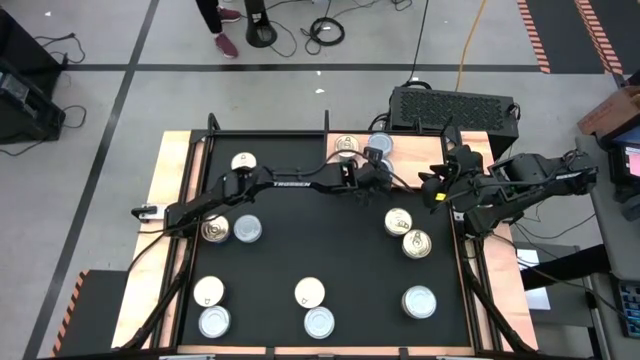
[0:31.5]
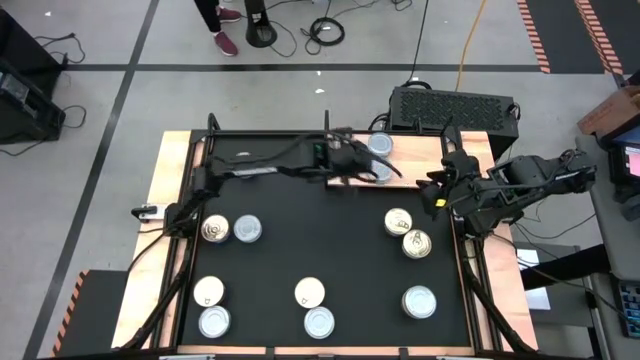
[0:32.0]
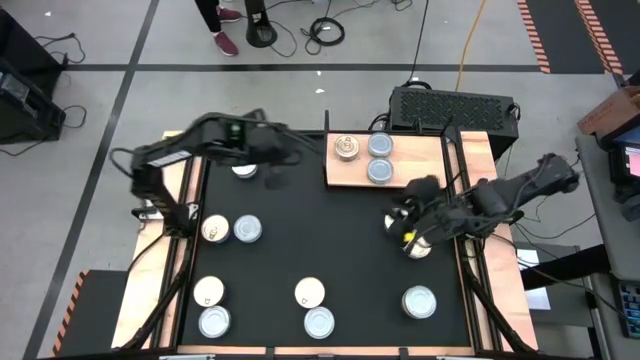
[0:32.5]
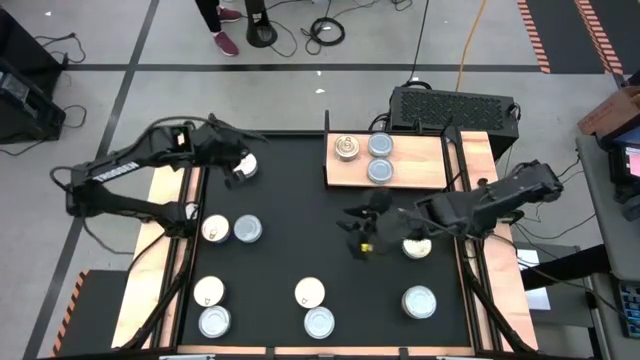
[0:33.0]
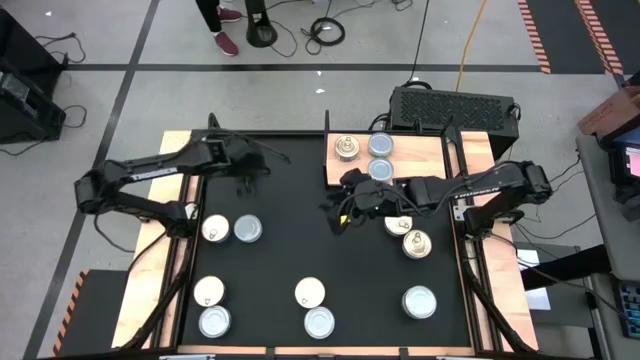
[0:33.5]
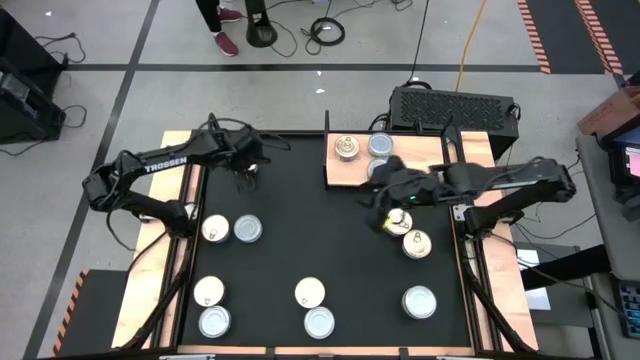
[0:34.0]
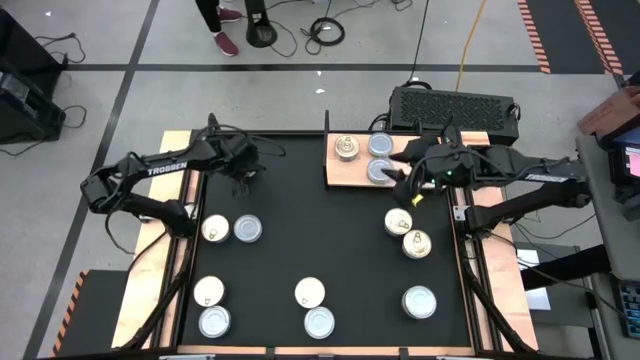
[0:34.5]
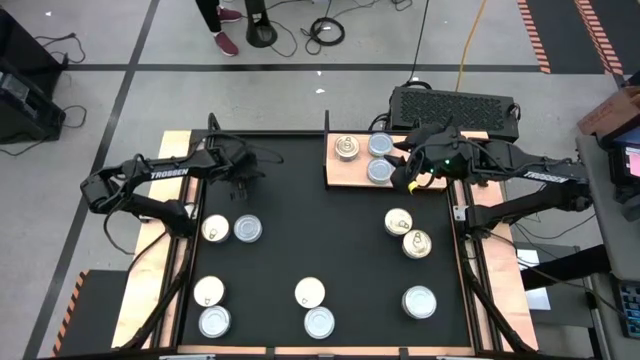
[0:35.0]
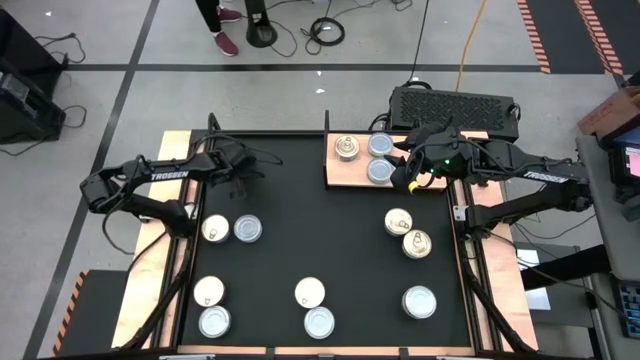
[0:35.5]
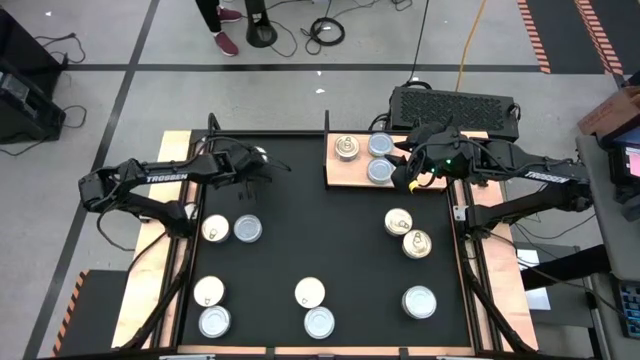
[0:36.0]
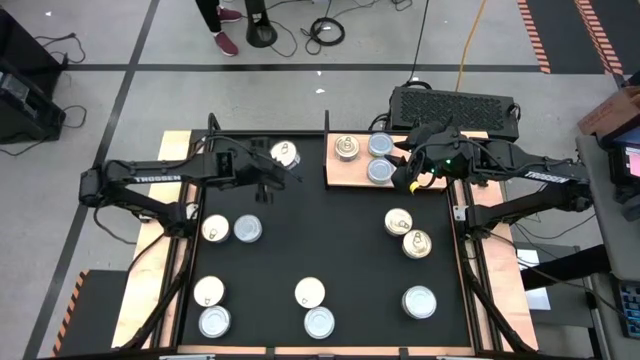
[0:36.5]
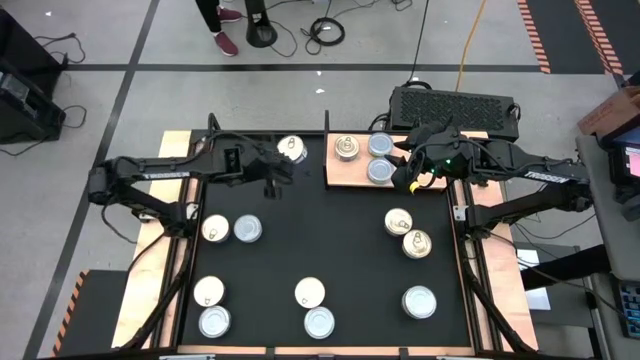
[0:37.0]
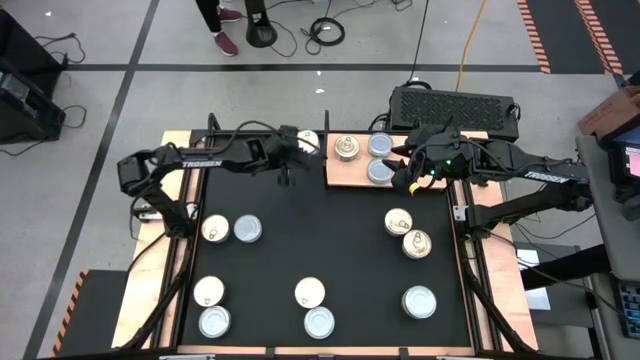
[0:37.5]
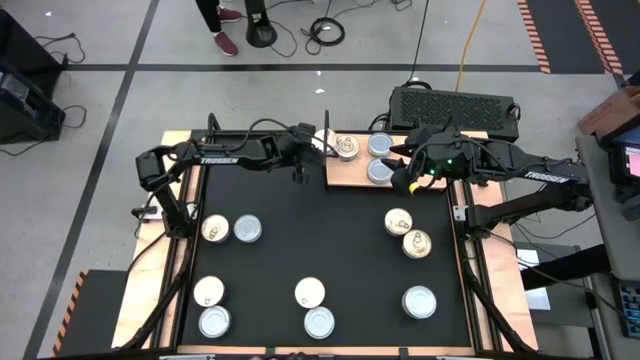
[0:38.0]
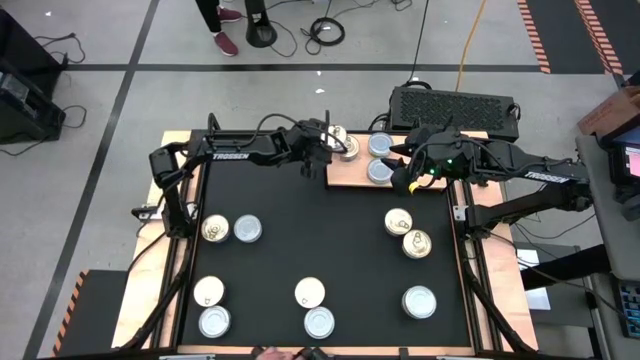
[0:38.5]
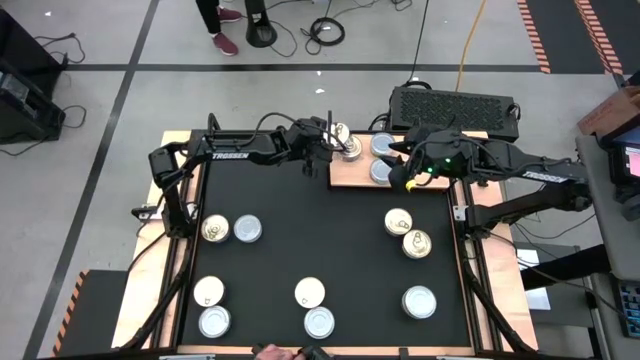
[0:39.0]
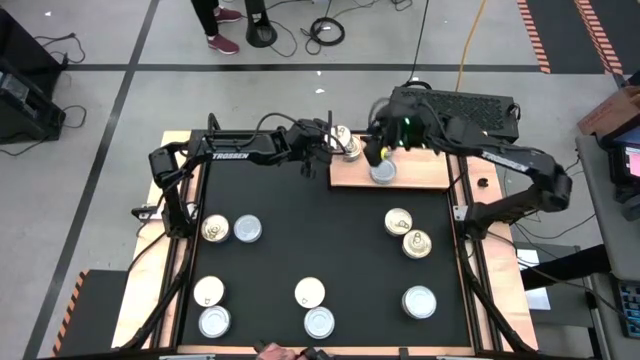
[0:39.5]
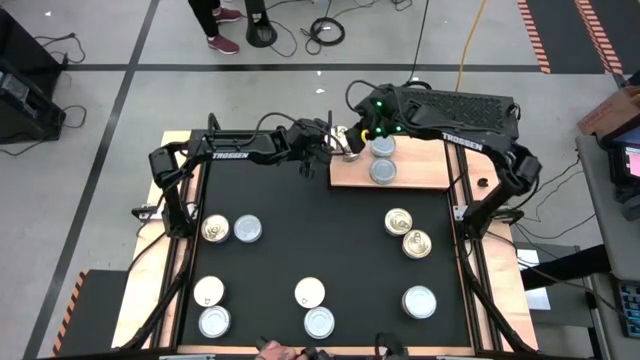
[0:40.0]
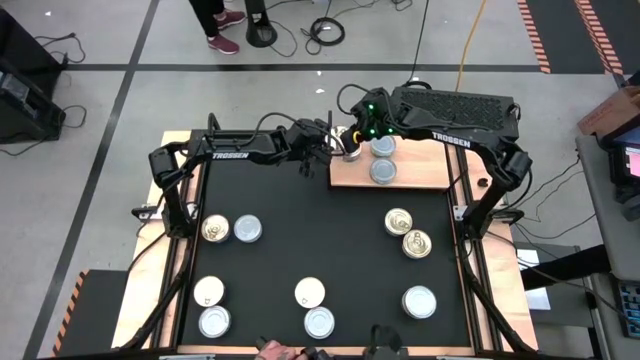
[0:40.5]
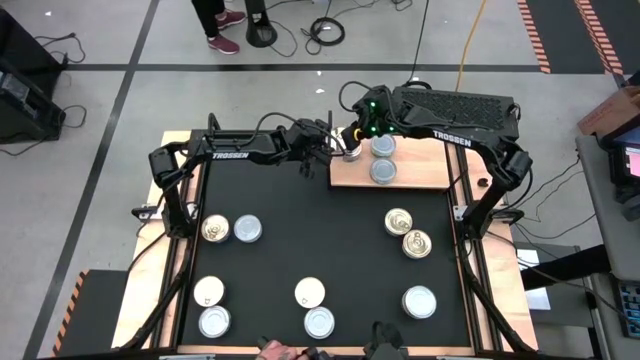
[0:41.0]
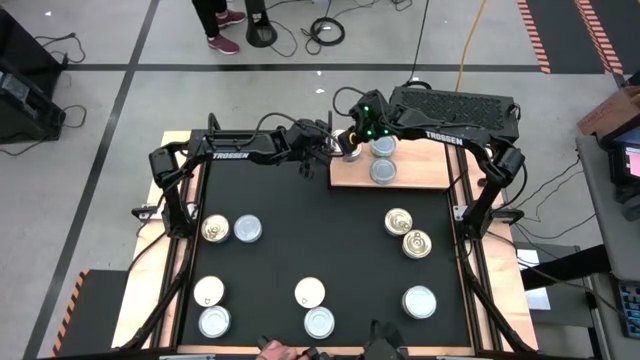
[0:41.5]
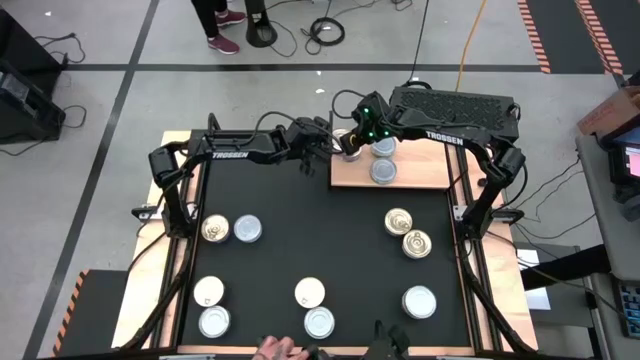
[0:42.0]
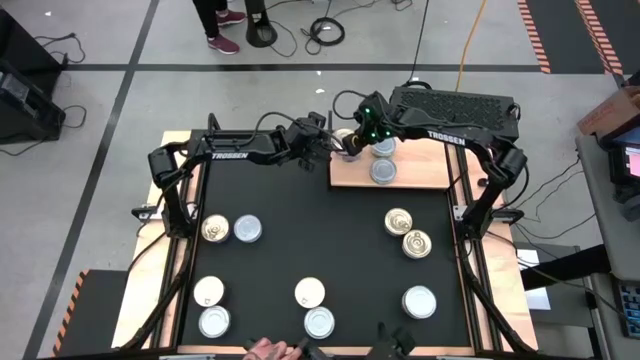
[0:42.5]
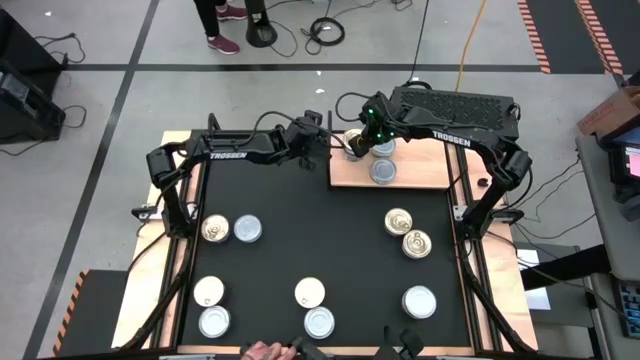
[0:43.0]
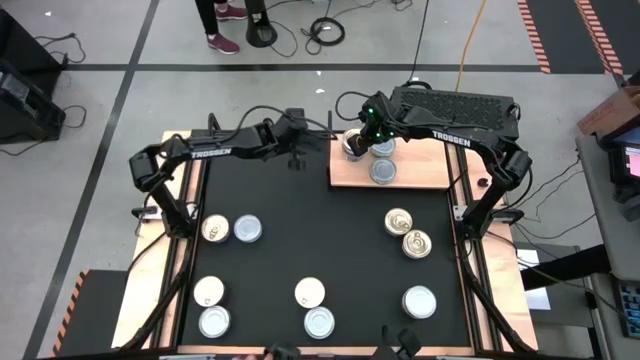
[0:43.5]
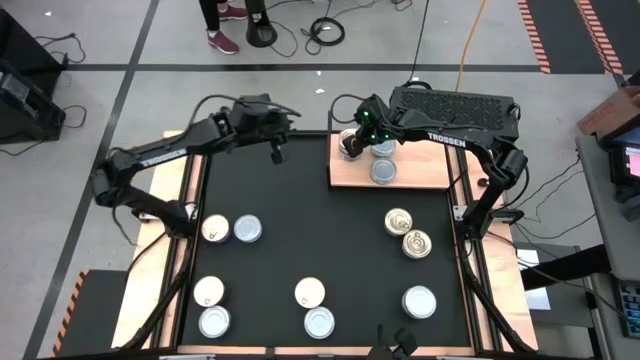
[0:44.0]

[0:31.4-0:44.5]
Task: Stack canned seafood by type on shelf
Stack the blue pink tuna can on top of the other blue pink tuna can on the shelf

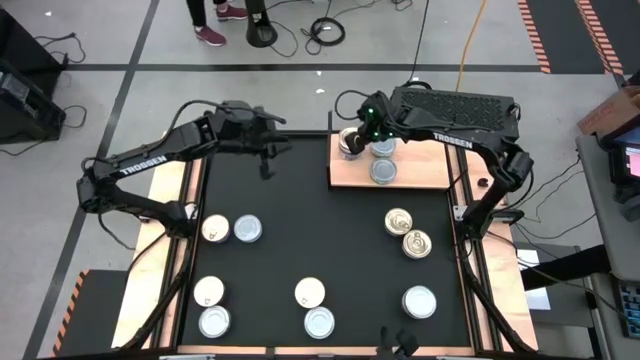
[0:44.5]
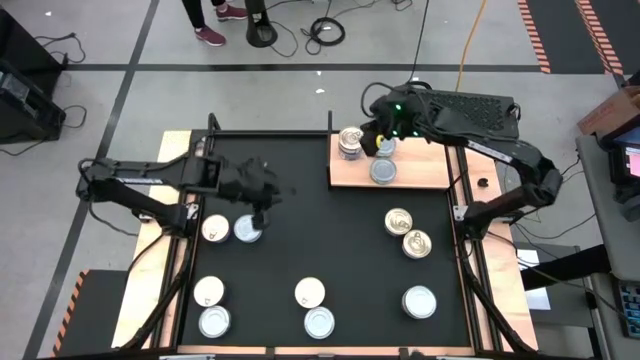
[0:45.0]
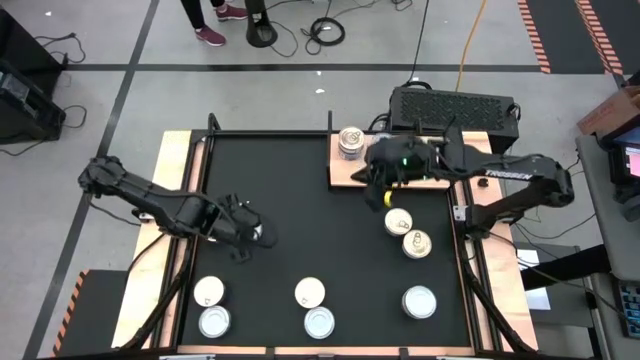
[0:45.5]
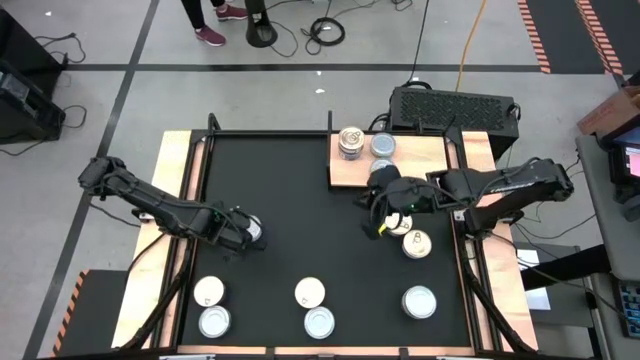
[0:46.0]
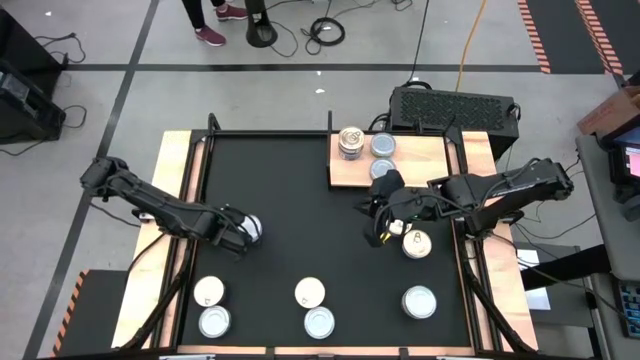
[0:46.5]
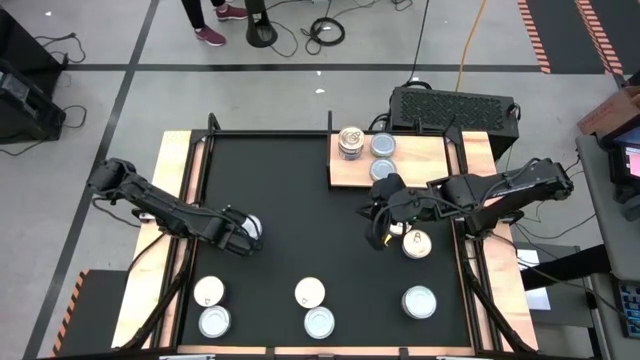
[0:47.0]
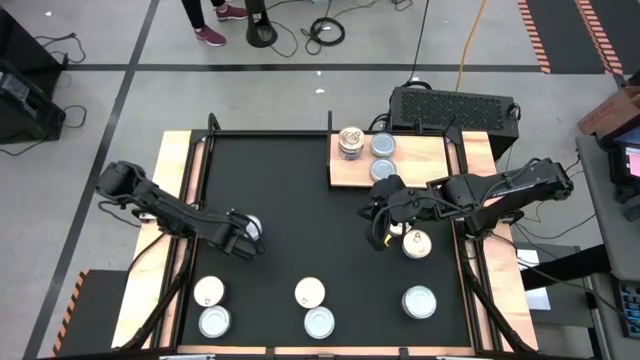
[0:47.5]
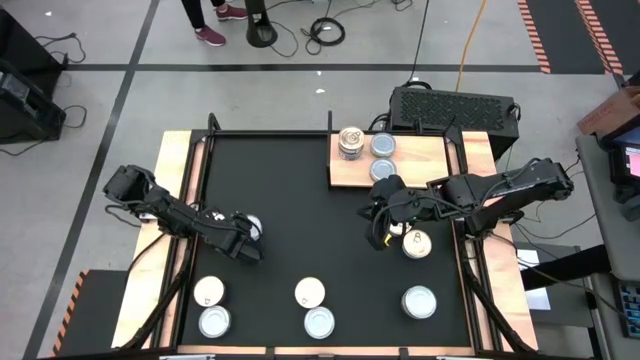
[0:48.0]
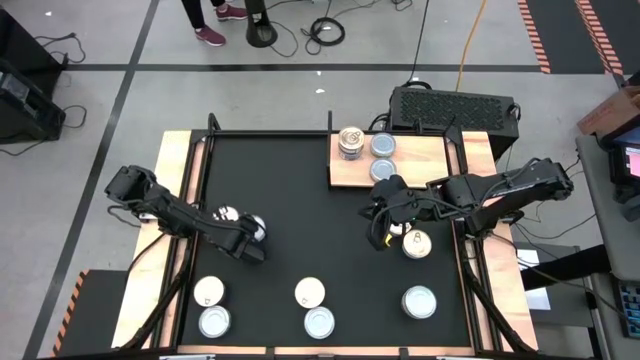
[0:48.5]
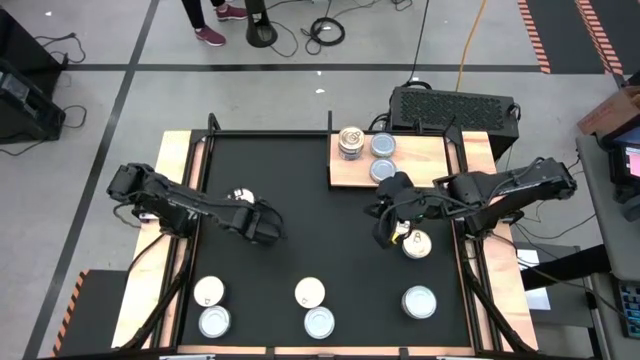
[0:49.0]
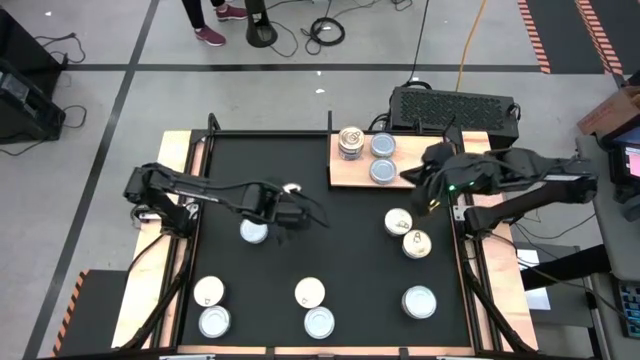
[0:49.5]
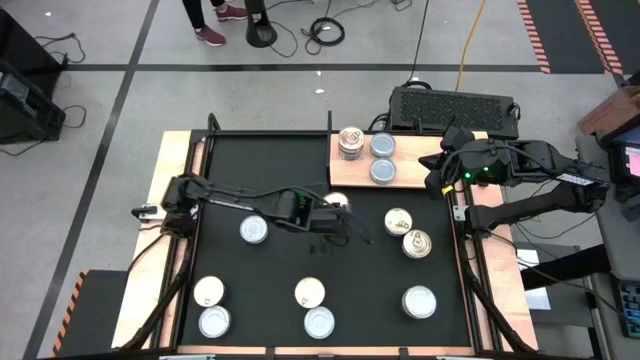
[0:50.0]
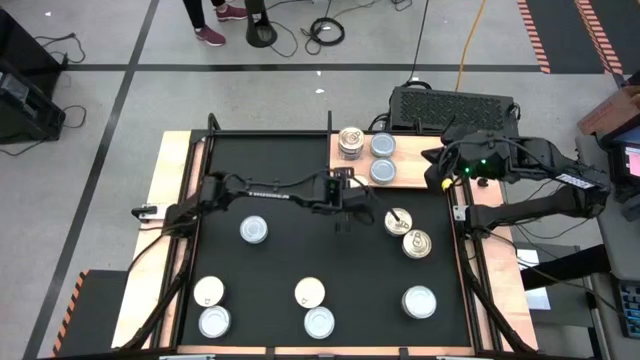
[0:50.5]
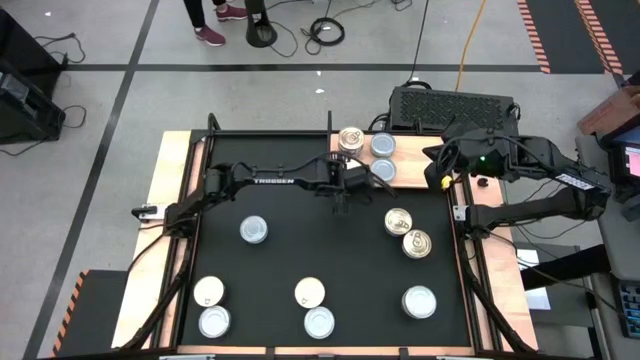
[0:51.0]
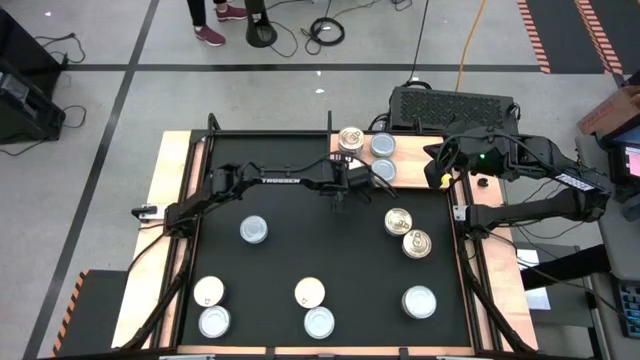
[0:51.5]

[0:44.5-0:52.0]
Put the blue pink tuna can on the shelf aligned with the other blue pink tuna can
